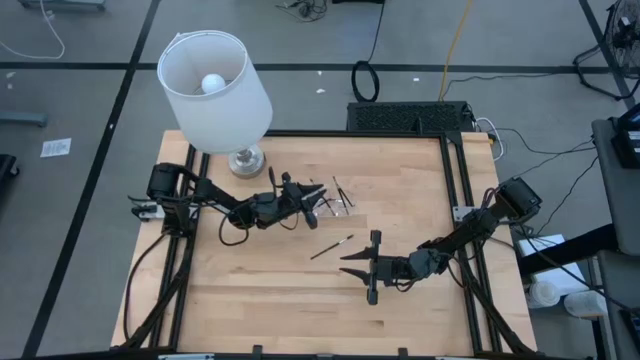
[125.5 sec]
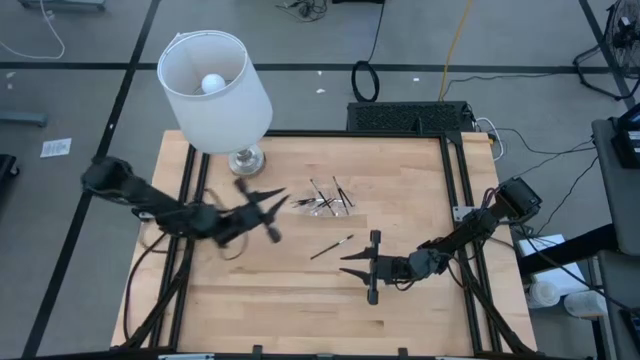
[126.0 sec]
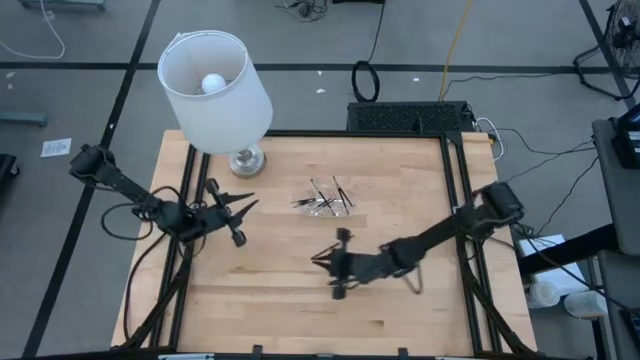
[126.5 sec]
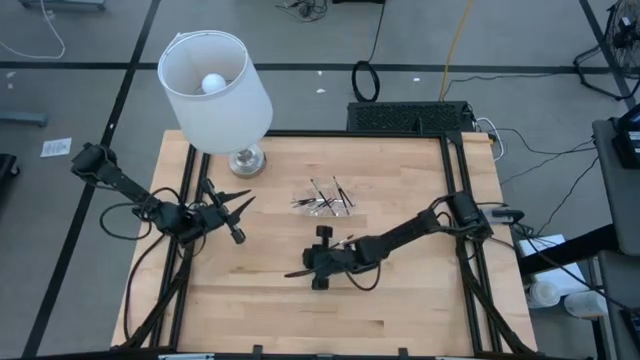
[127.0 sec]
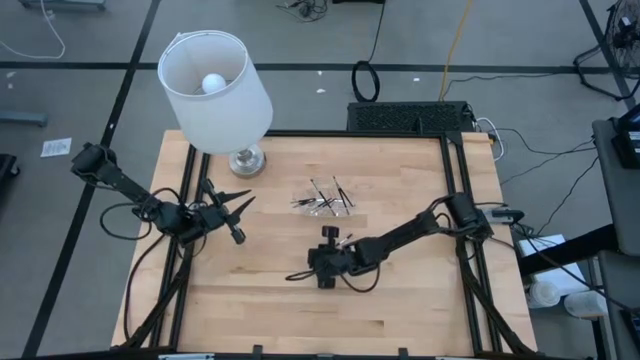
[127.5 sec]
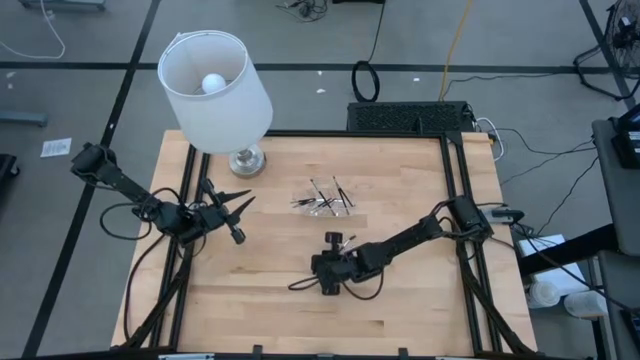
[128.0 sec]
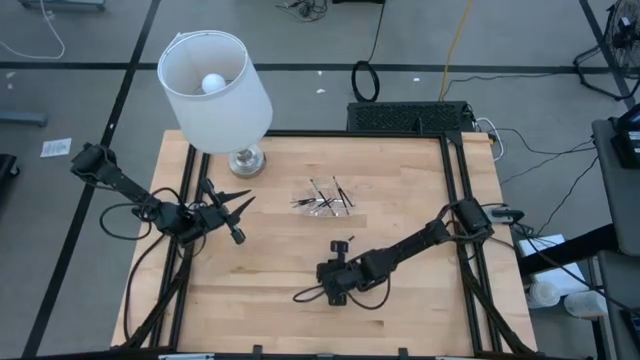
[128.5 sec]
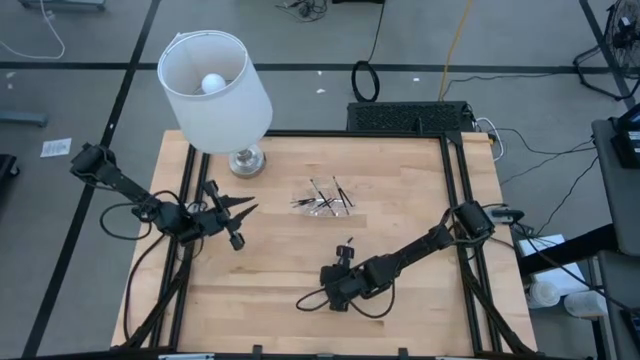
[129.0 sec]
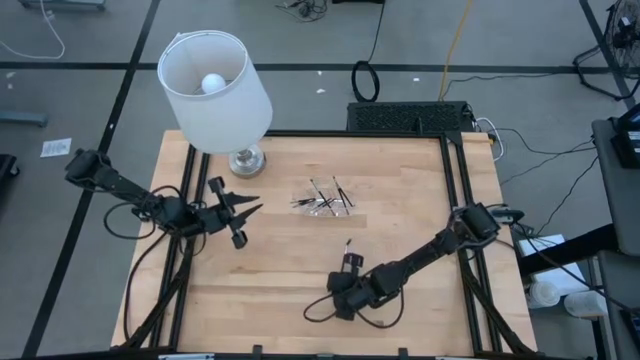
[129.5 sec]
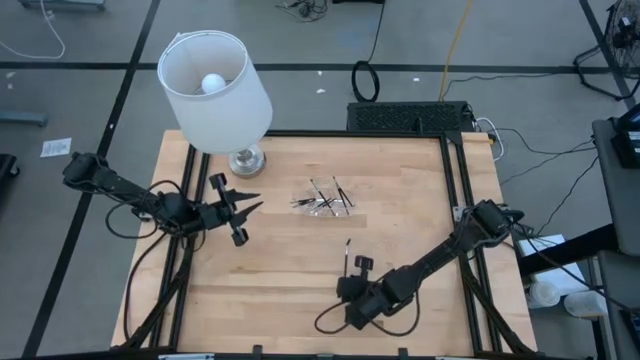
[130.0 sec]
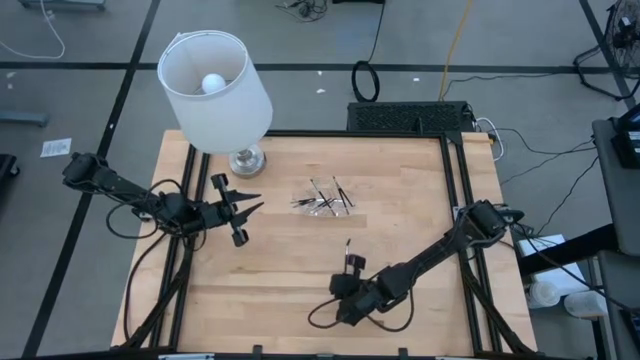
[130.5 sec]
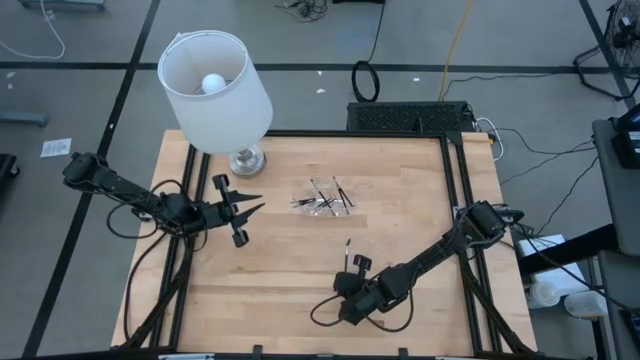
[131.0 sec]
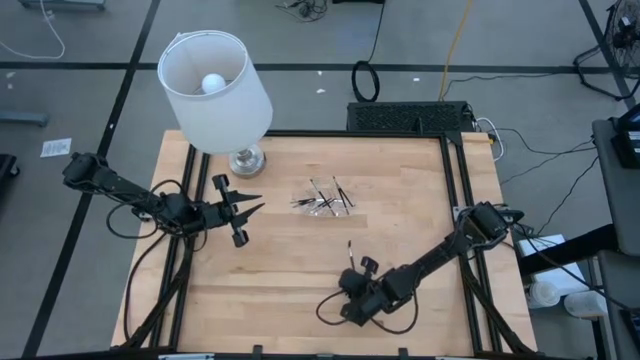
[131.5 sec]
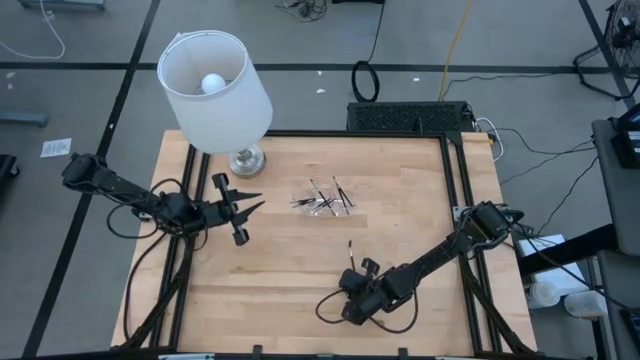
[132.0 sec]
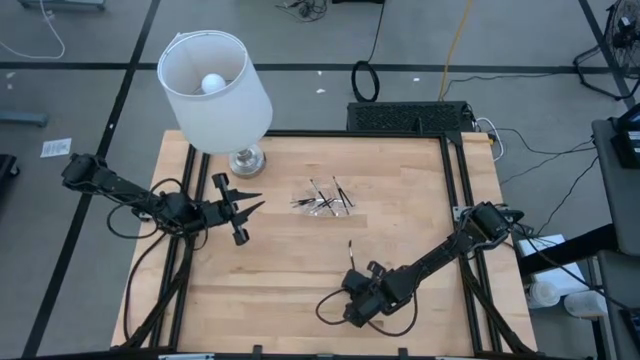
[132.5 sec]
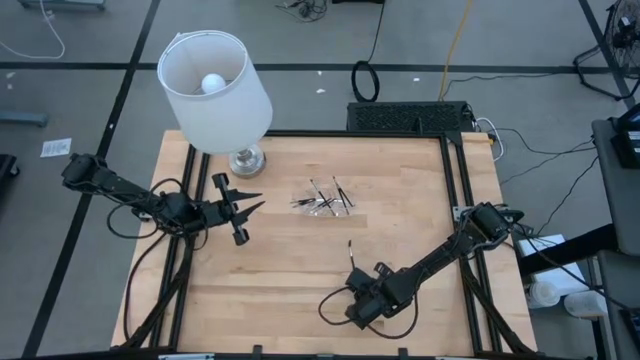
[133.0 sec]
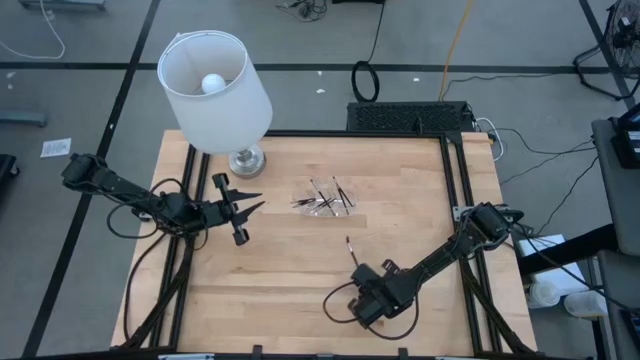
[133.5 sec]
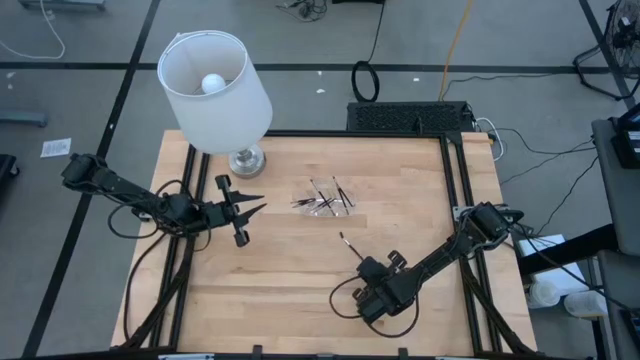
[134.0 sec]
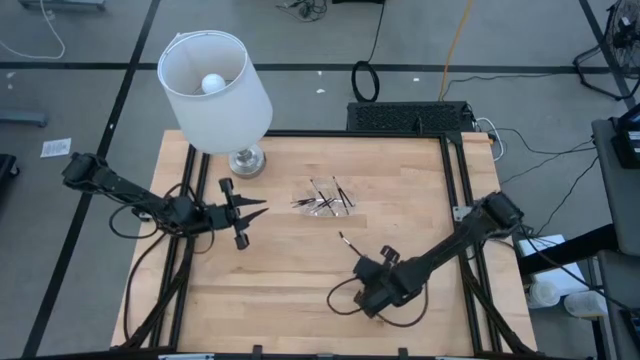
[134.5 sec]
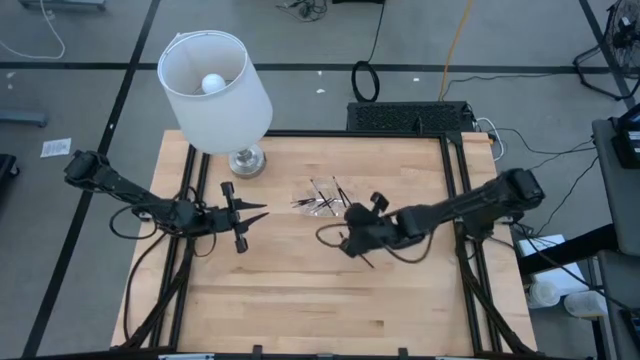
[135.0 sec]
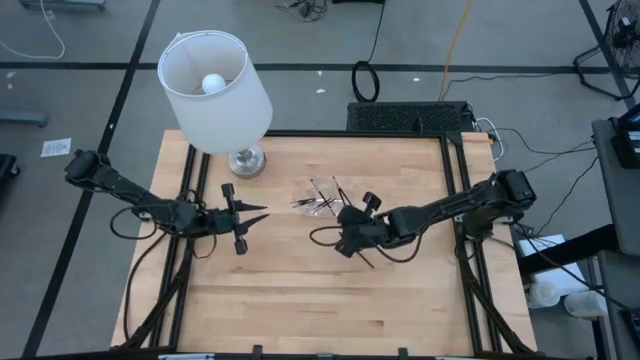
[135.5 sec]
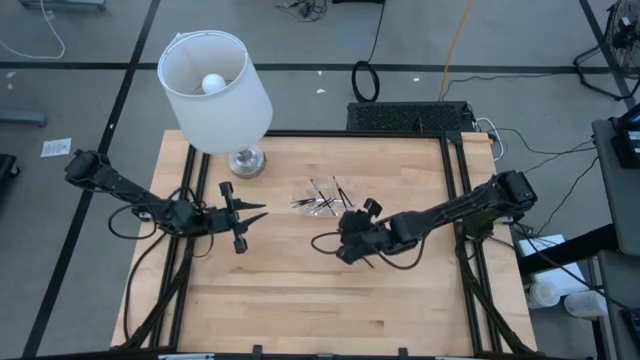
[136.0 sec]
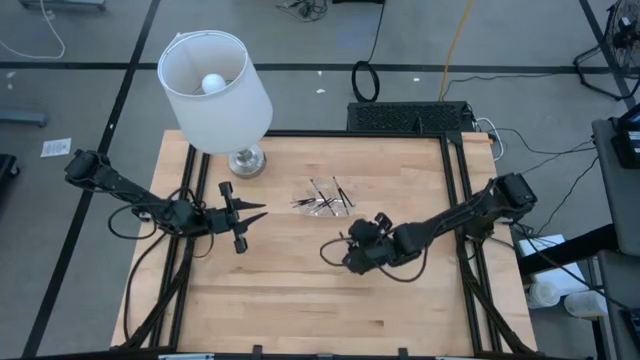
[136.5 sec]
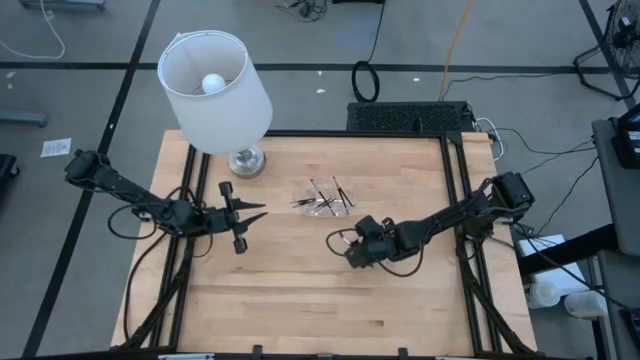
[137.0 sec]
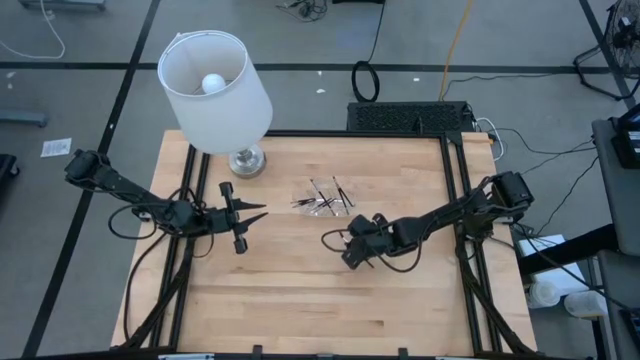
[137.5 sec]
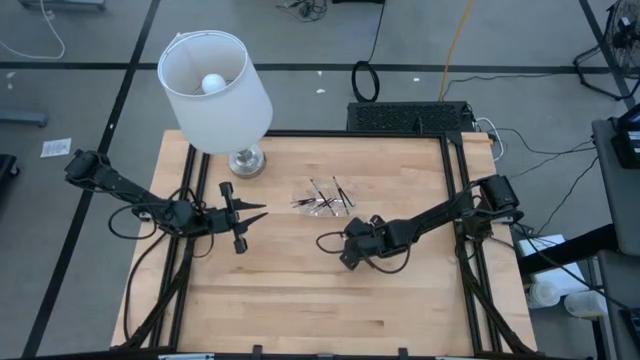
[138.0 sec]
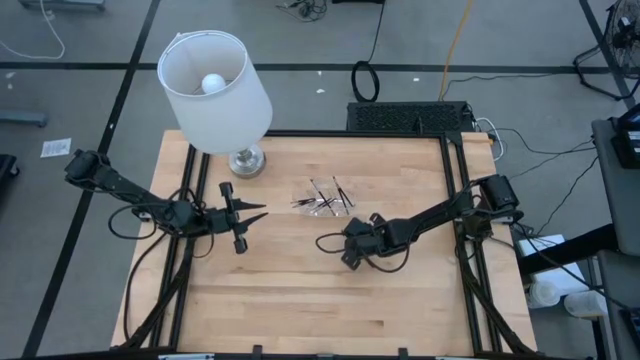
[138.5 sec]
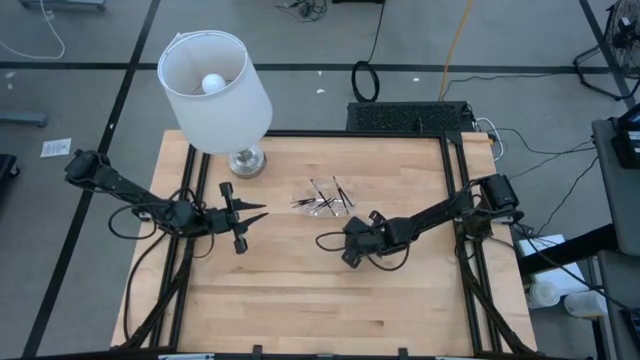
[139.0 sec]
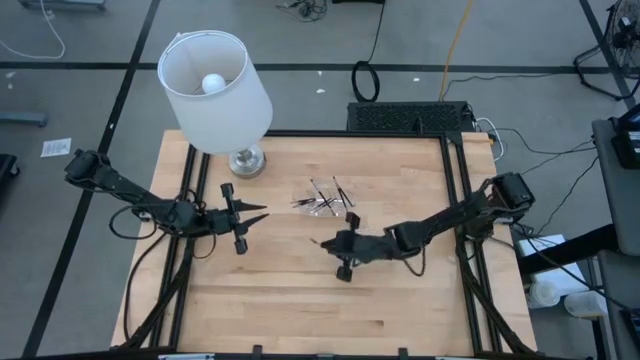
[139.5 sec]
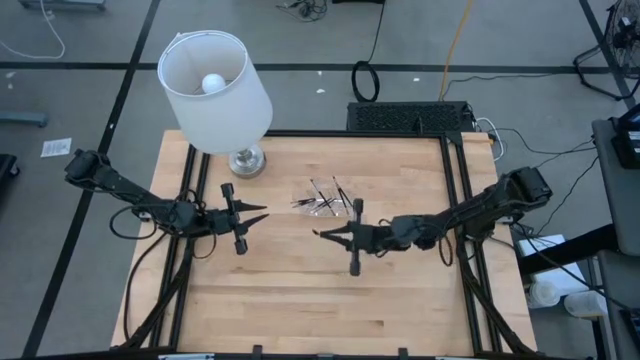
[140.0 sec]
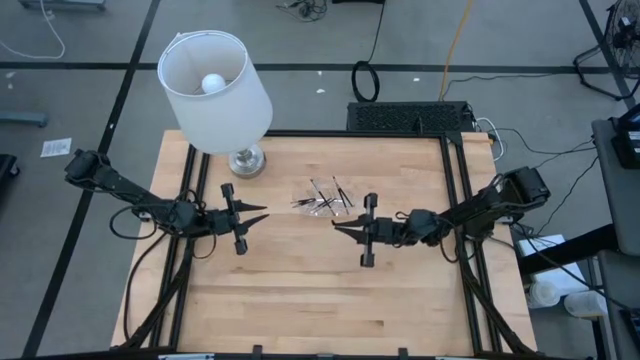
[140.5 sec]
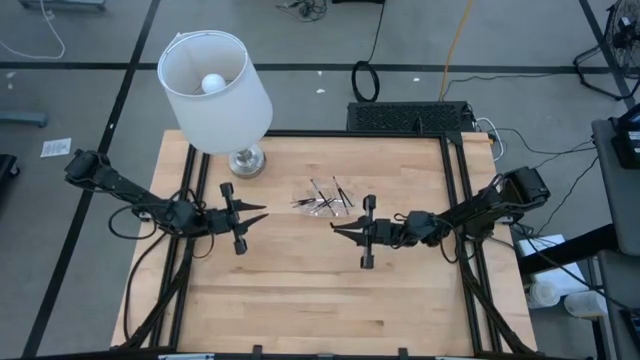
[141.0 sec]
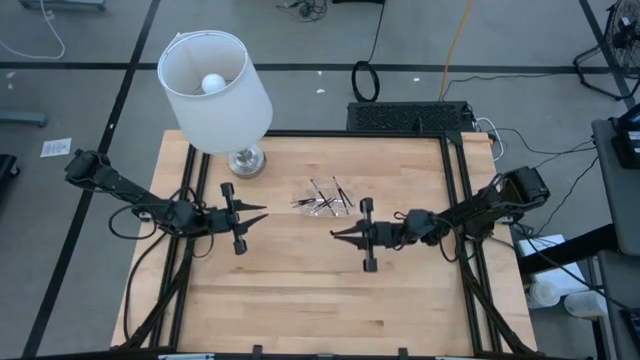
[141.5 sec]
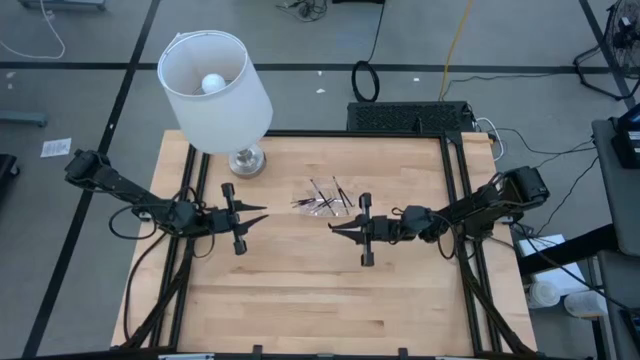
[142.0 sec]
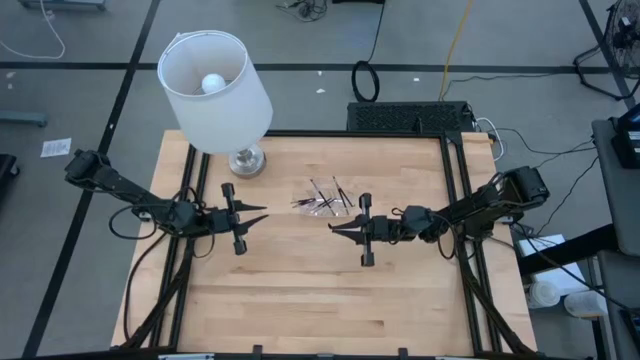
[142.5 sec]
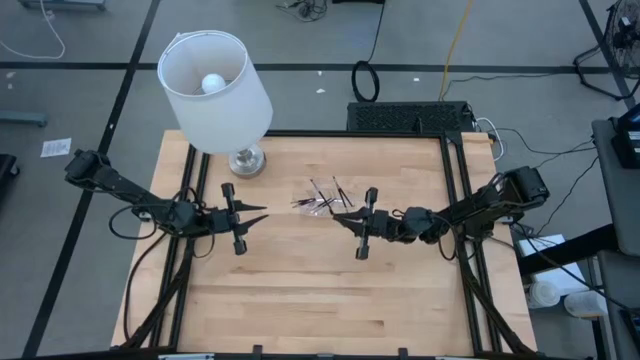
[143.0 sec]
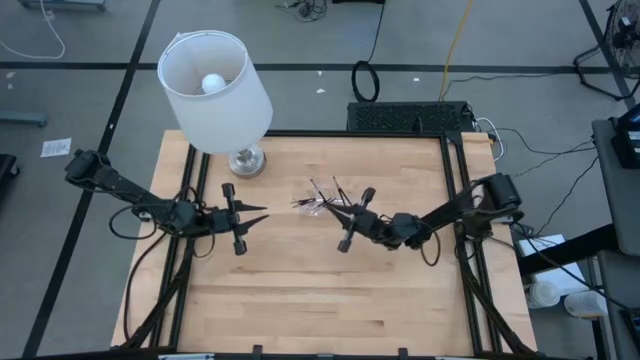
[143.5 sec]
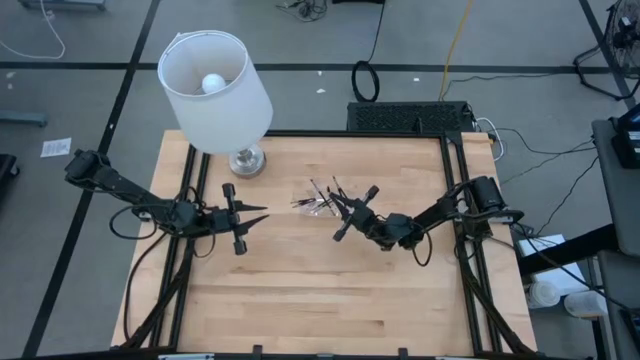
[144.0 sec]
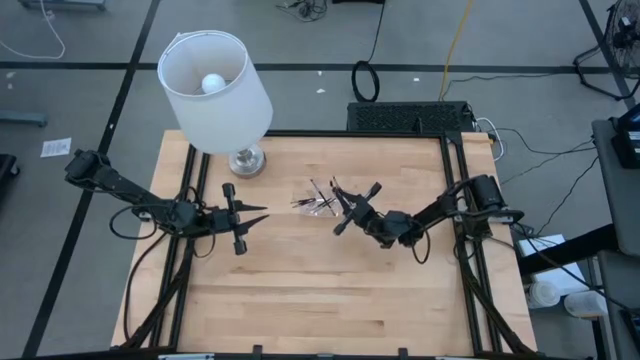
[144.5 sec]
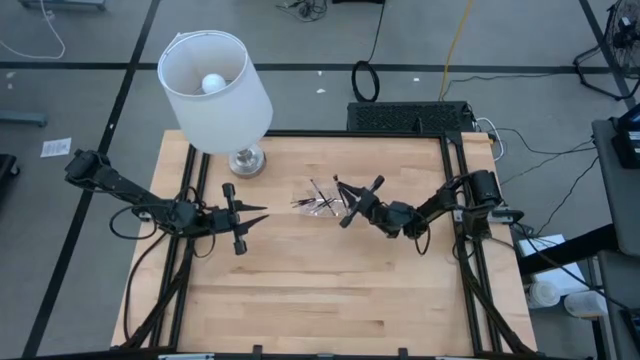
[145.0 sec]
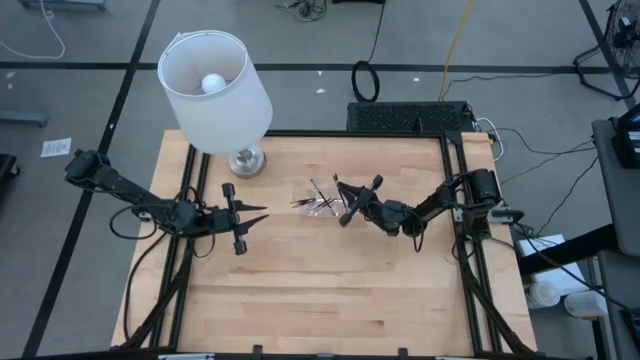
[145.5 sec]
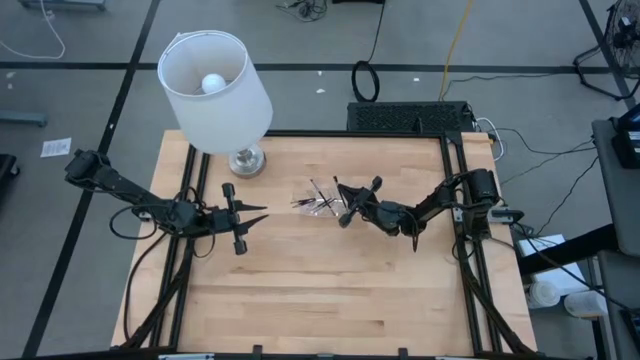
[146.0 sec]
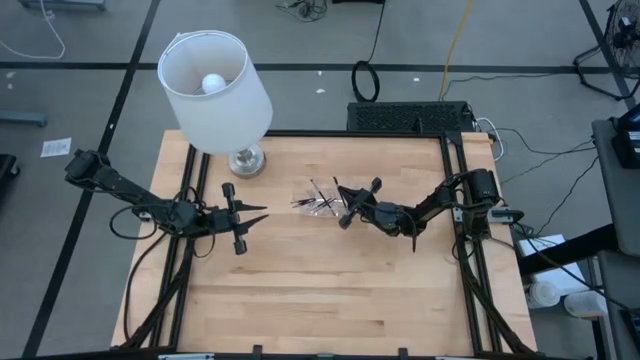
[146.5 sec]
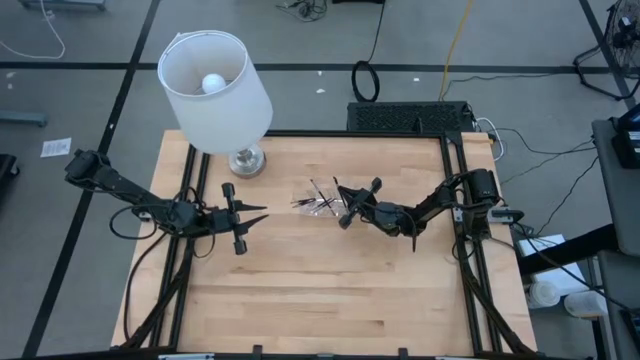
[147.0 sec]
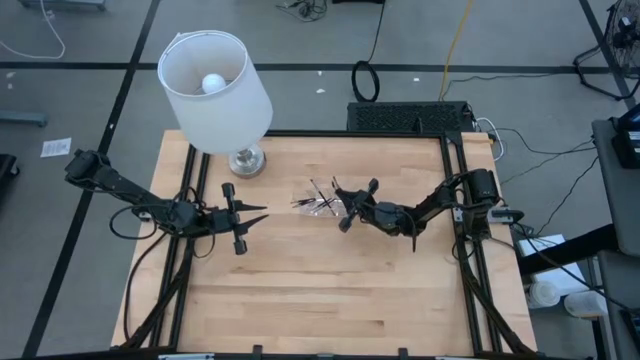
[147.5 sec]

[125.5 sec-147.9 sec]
Task: Put items in baskets/containers
Put the brow brush into the transparent organizer
